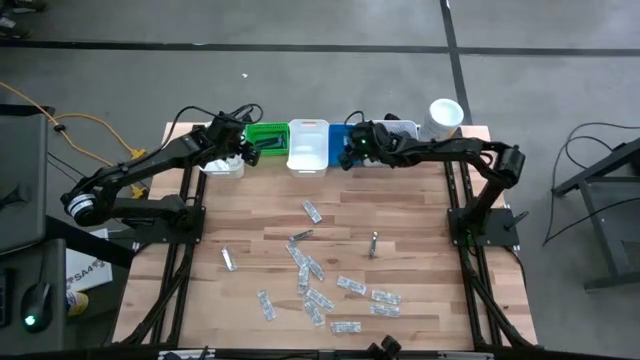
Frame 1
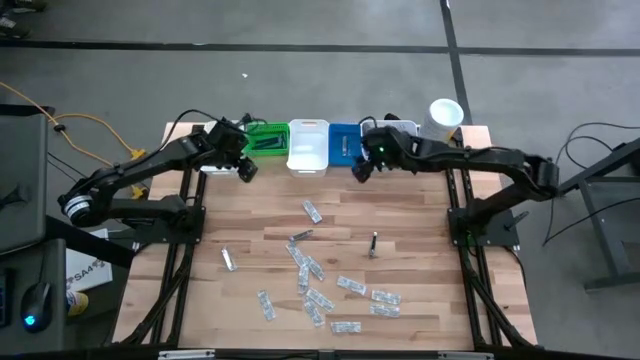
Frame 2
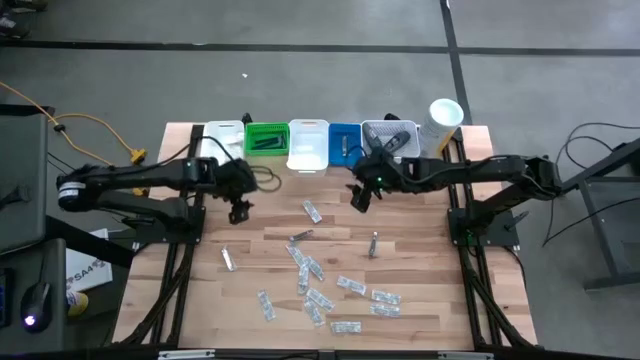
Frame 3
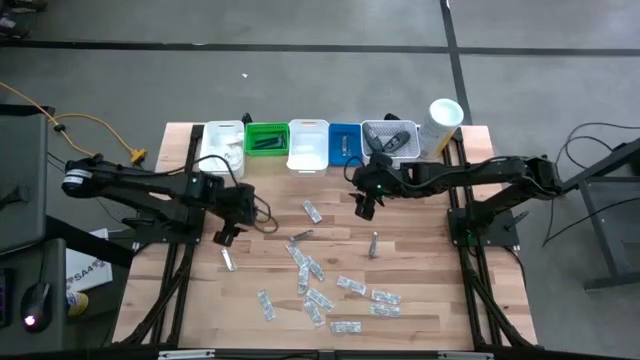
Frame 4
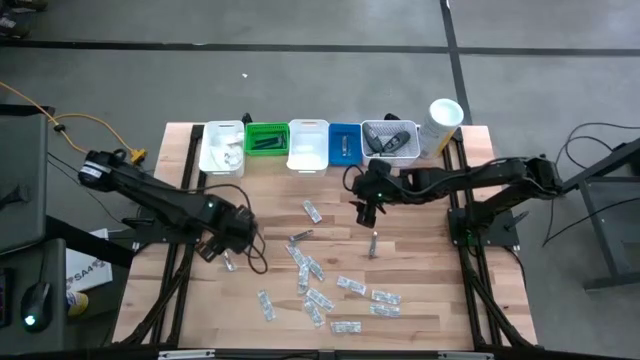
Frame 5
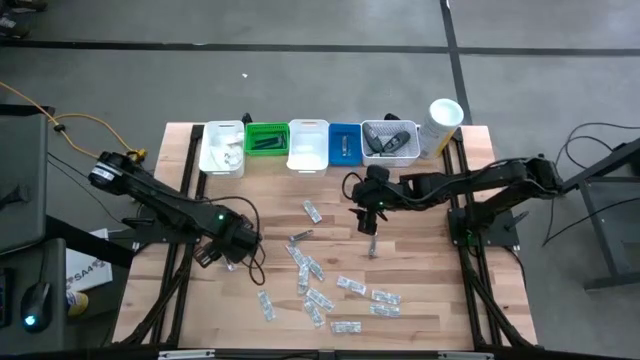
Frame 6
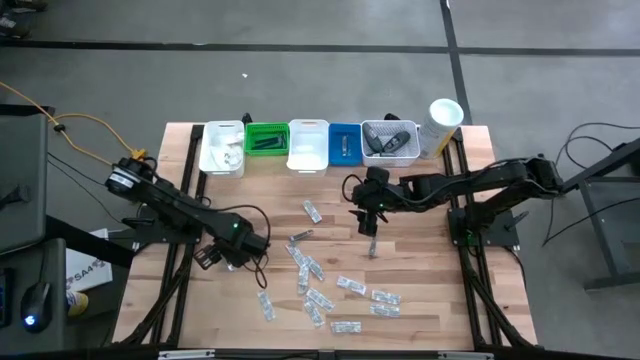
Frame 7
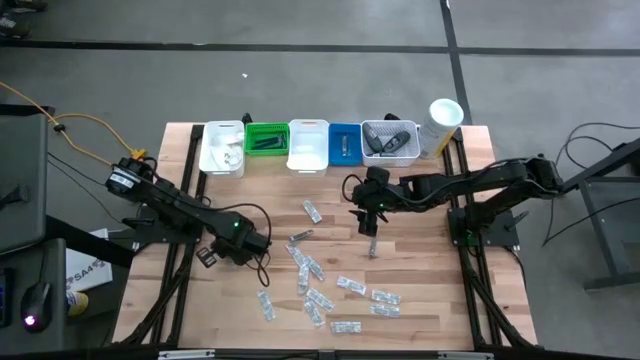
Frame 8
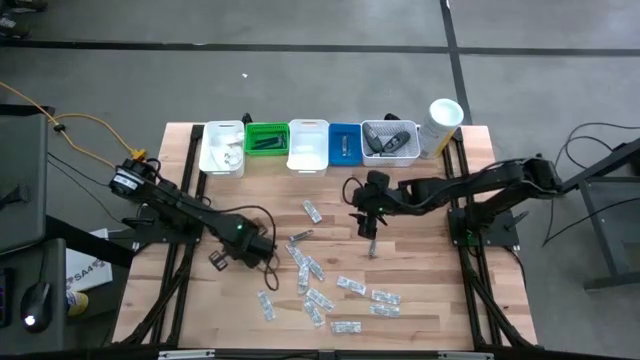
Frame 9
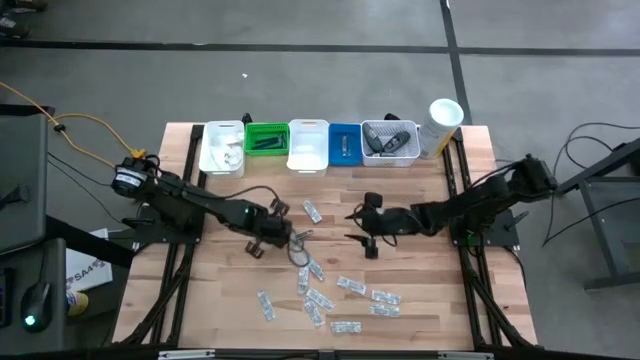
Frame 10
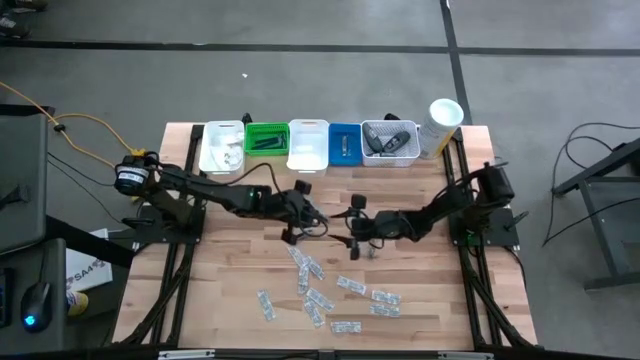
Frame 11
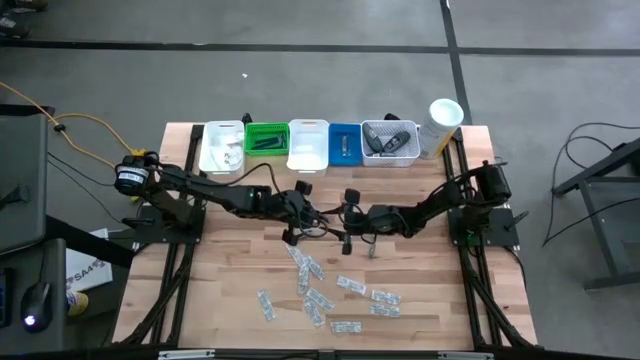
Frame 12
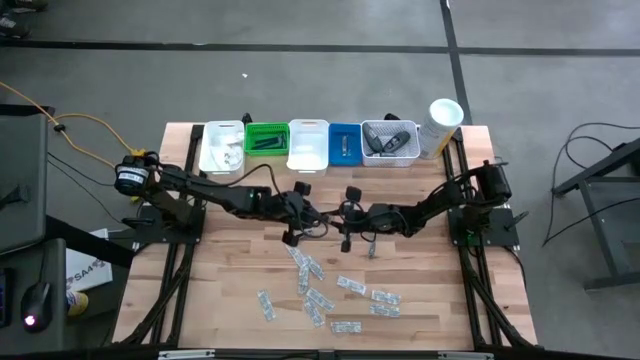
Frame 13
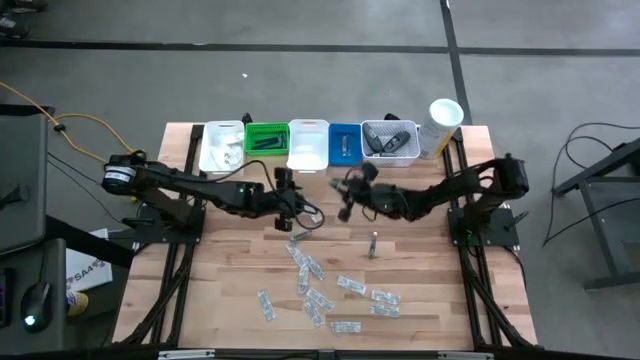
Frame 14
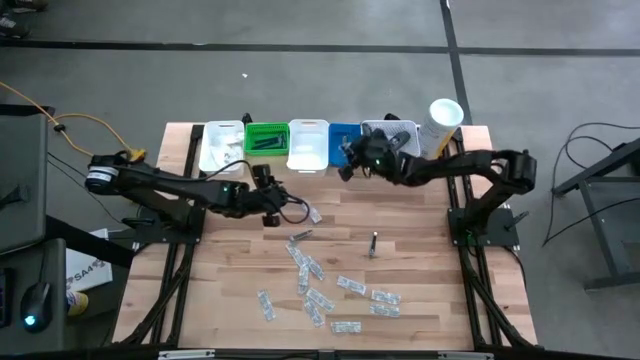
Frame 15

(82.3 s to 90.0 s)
Task: Pick & Place Travel size toiletries
Put the silver nail cutter into the blue bin

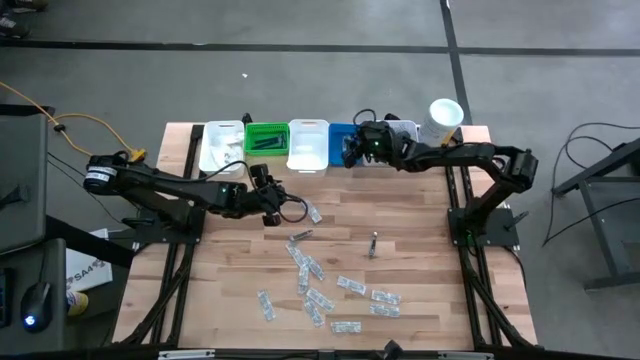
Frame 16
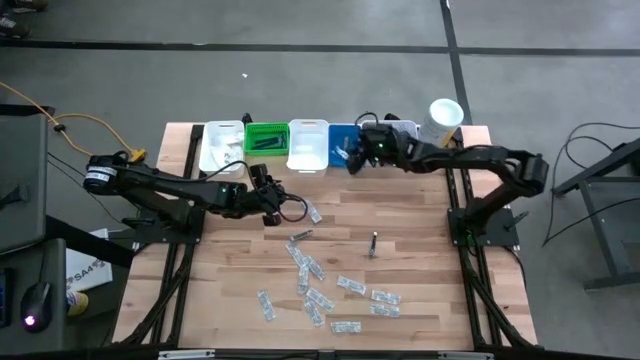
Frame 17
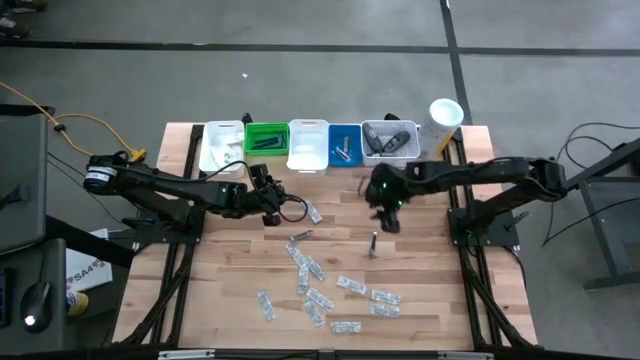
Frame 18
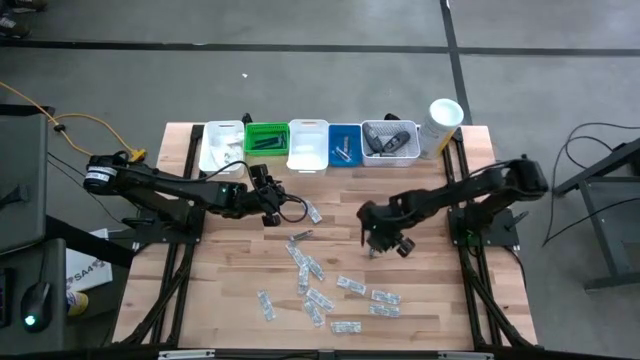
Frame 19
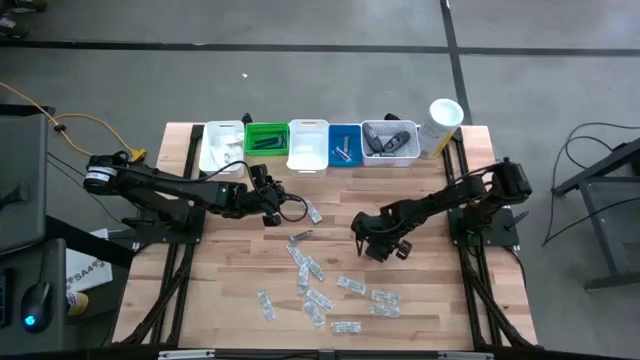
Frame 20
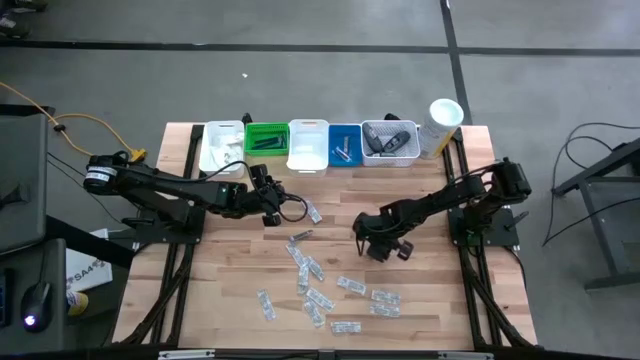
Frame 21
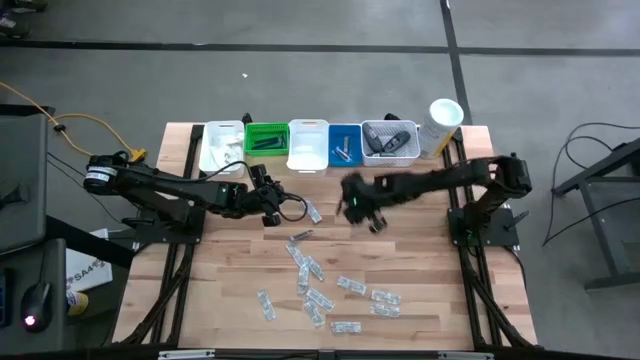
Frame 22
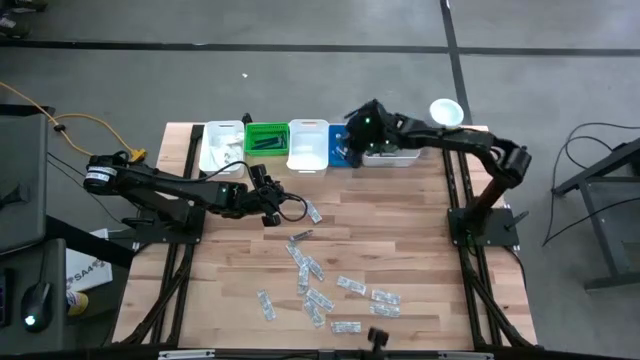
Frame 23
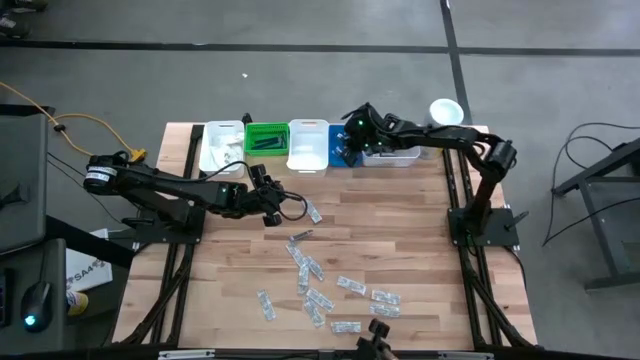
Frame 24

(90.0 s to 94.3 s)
Put the silver nail cutter into the blue bin

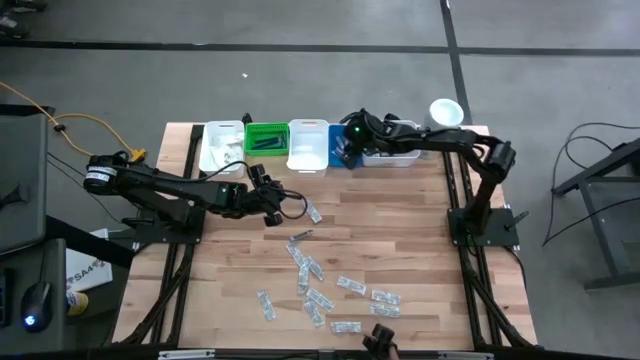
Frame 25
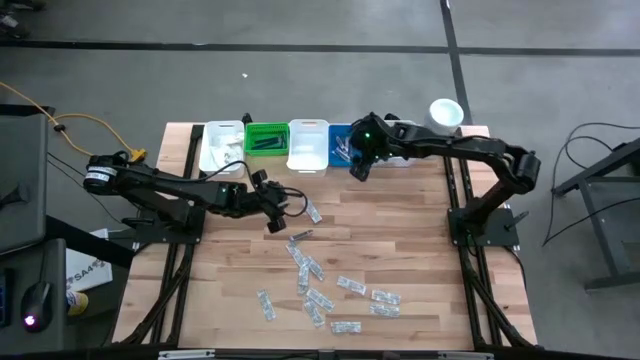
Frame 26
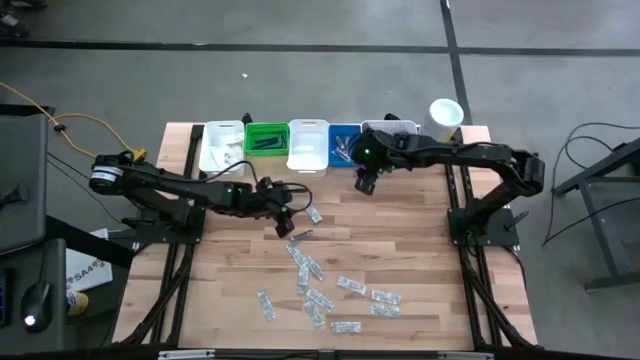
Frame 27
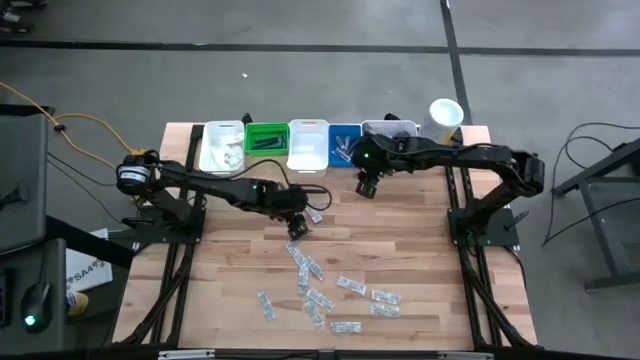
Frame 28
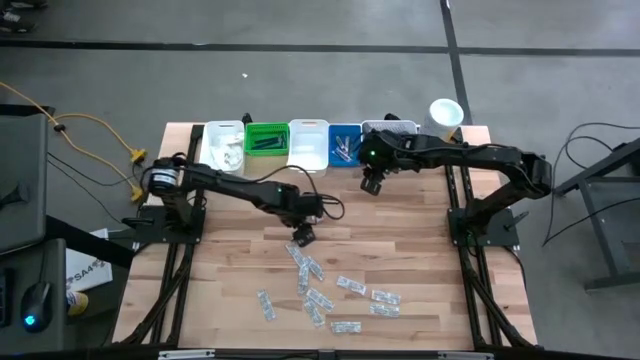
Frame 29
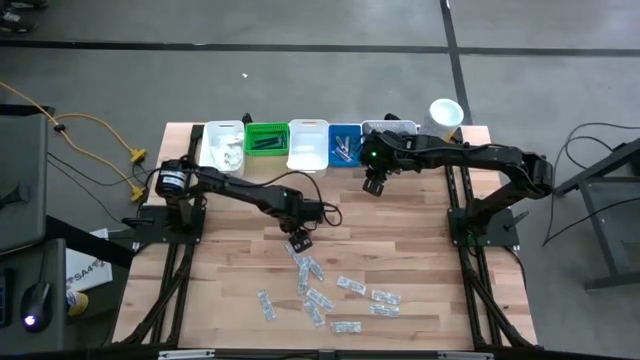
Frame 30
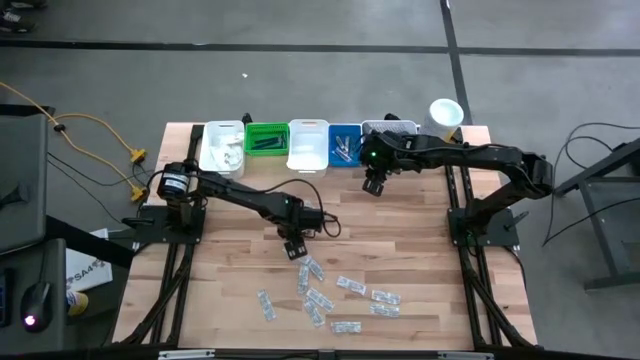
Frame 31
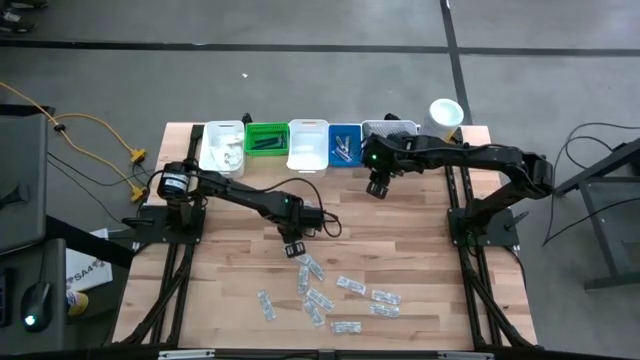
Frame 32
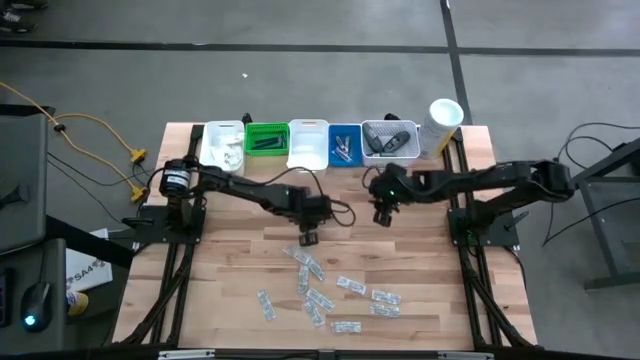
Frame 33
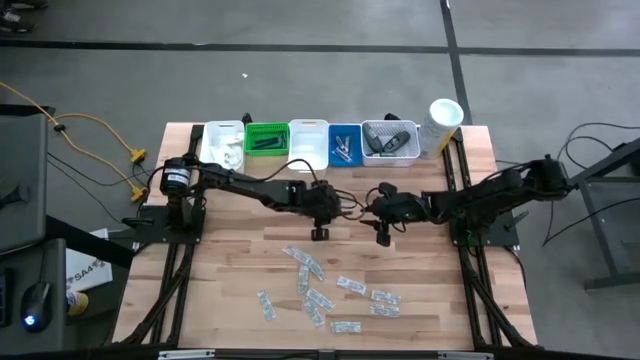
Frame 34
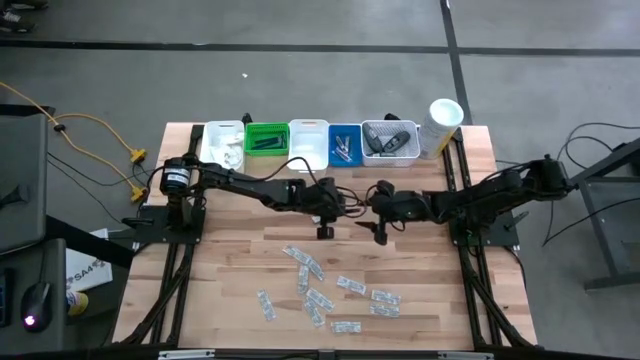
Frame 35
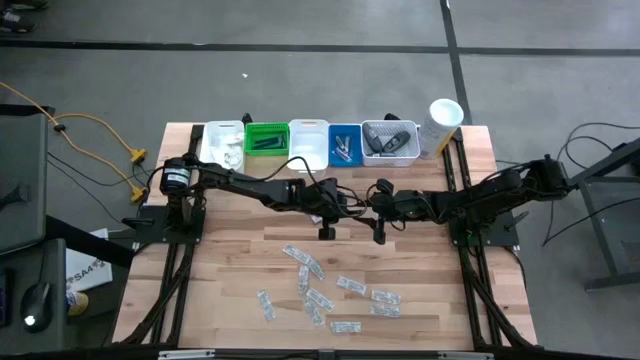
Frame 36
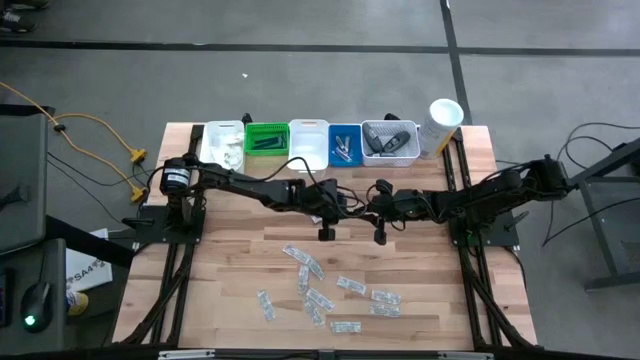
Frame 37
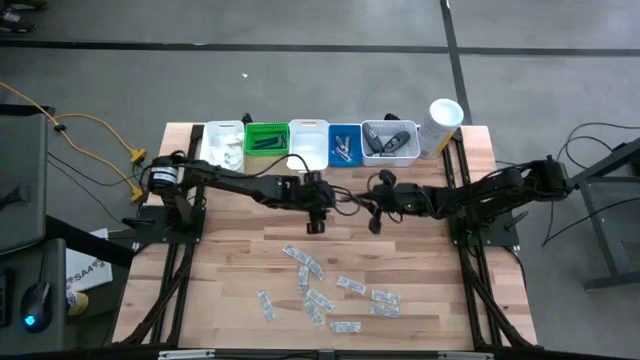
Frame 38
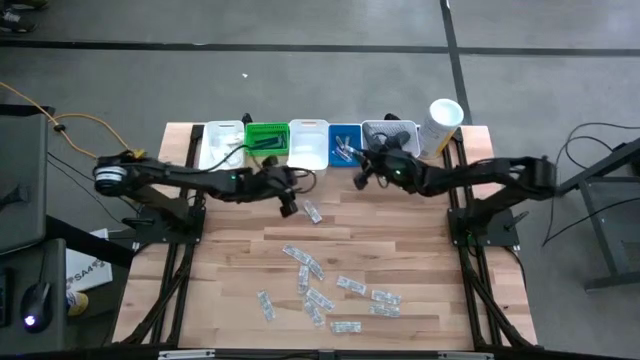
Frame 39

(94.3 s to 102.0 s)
Put the silver nail cutter into the blue bin

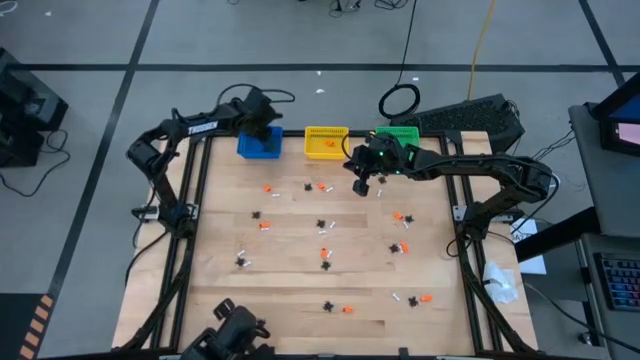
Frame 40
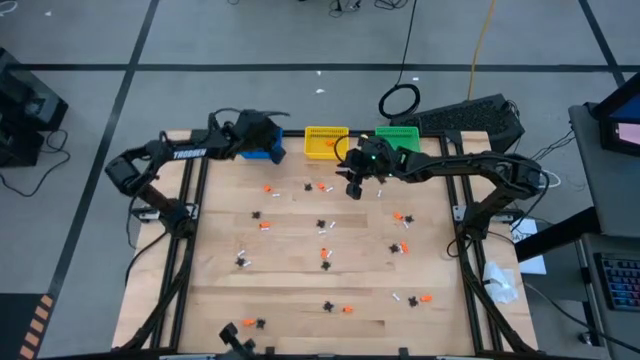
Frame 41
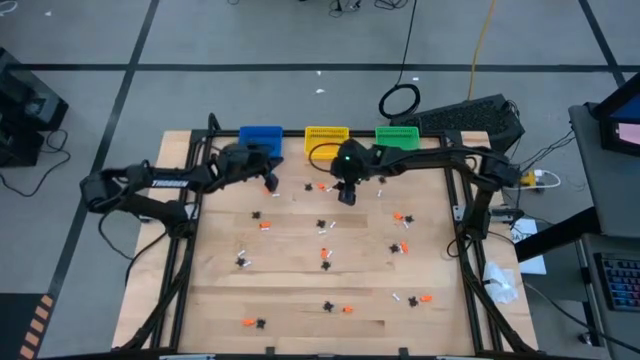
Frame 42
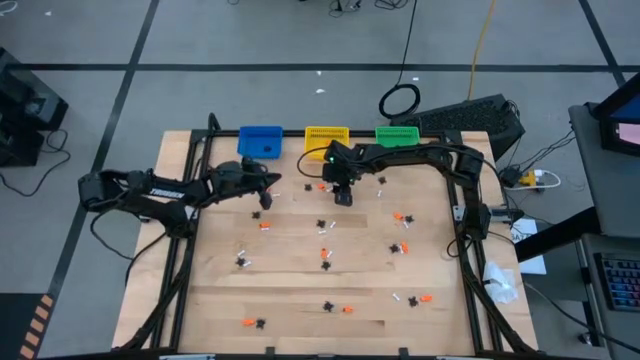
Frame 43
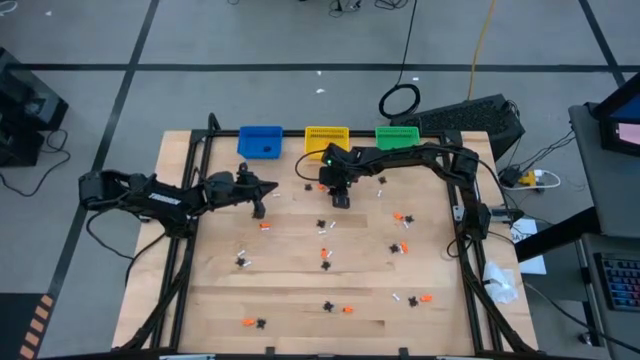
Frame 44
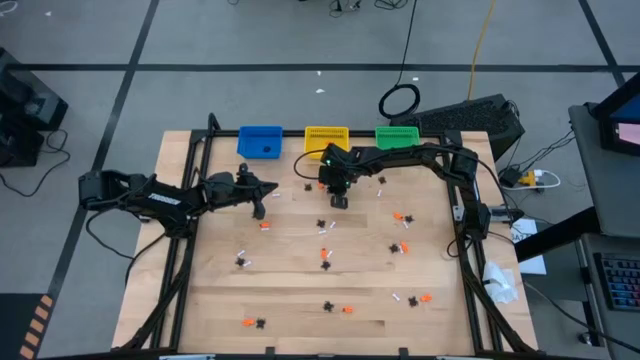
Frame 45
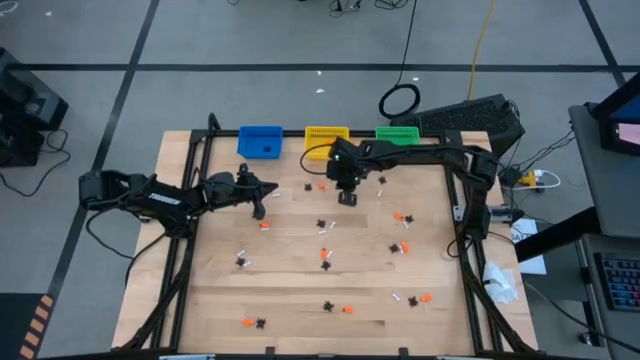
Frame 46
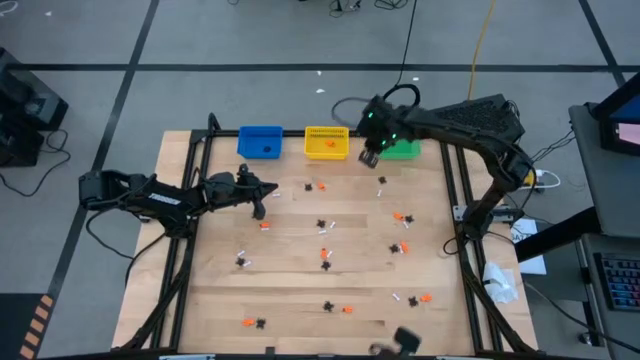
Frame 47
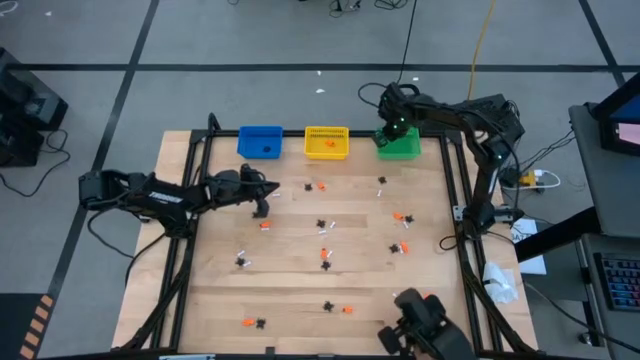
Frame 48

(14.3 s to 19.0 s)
Task: Sort Halloween decoration
Put the white bone toy into the green bin
